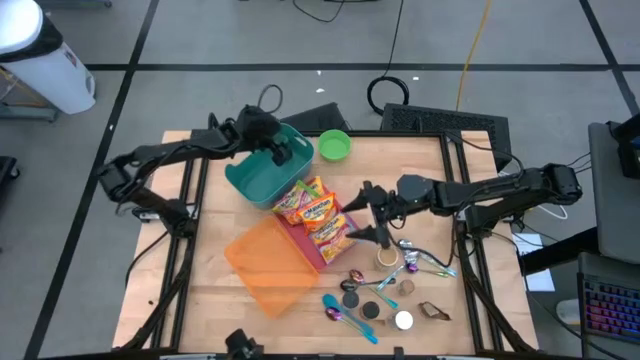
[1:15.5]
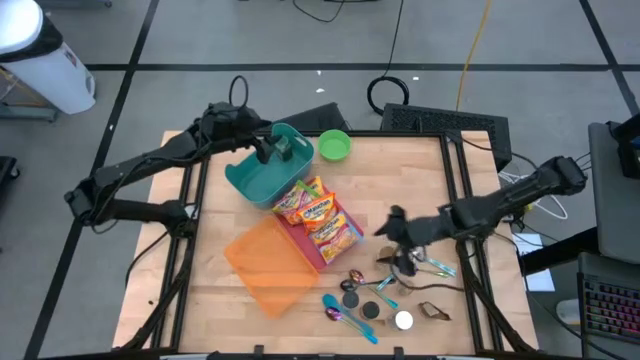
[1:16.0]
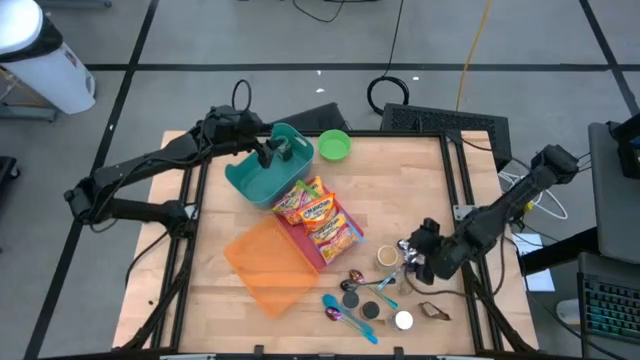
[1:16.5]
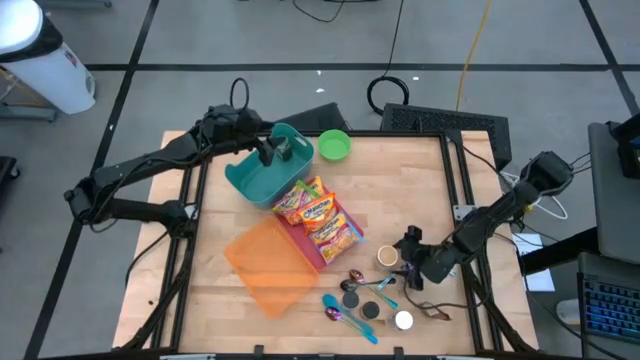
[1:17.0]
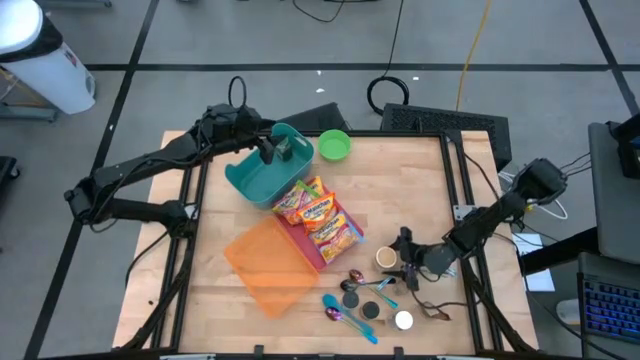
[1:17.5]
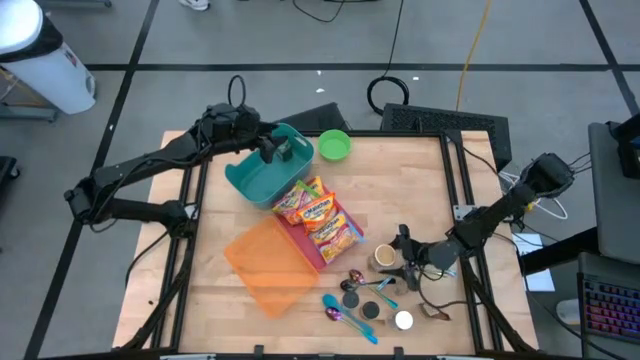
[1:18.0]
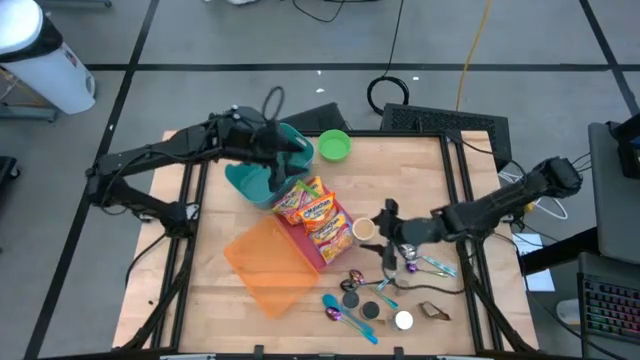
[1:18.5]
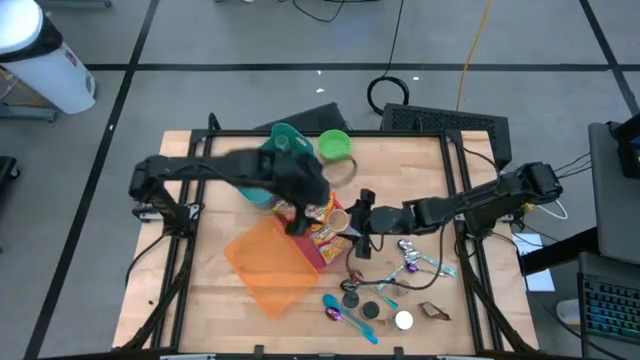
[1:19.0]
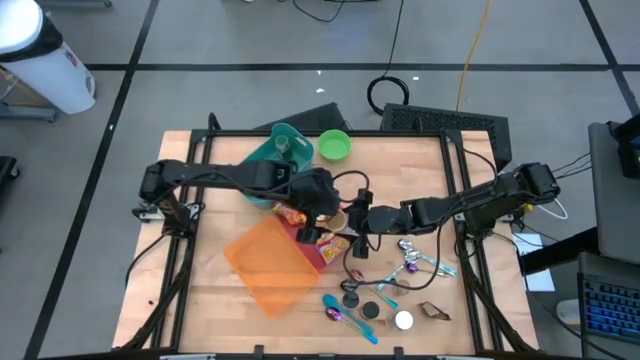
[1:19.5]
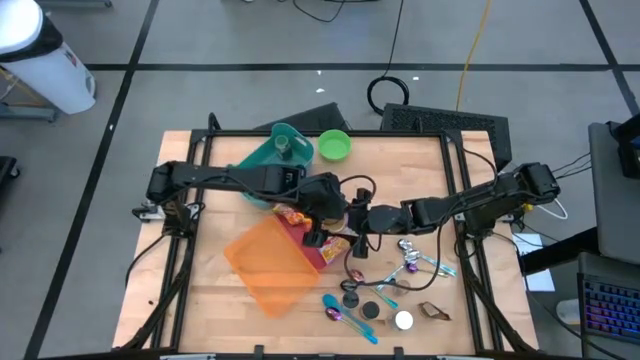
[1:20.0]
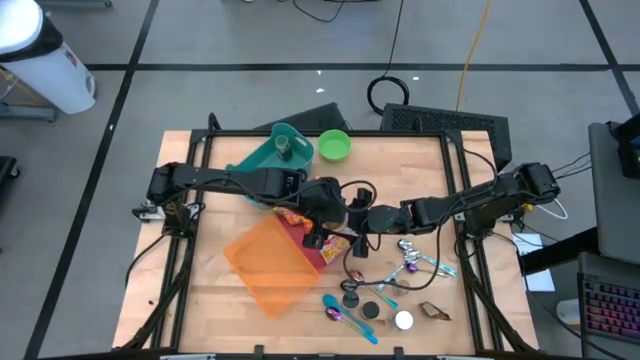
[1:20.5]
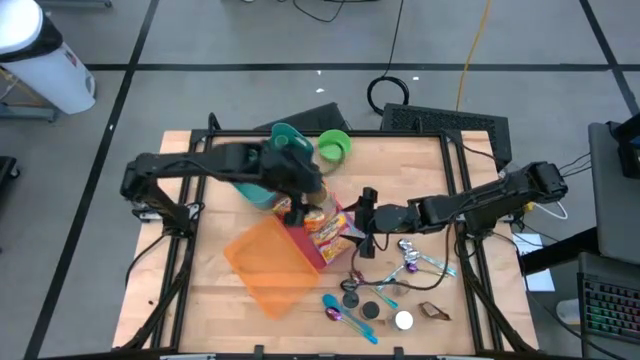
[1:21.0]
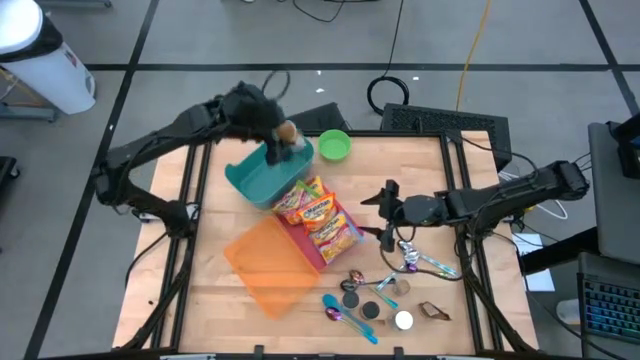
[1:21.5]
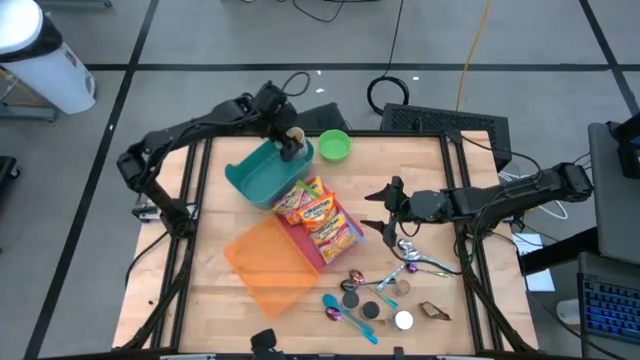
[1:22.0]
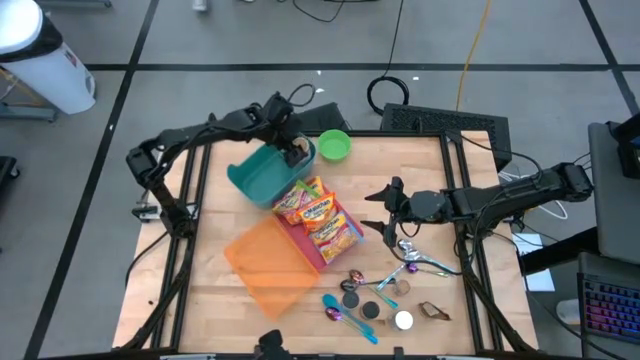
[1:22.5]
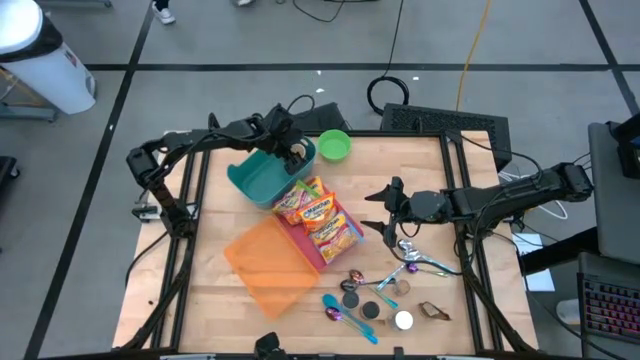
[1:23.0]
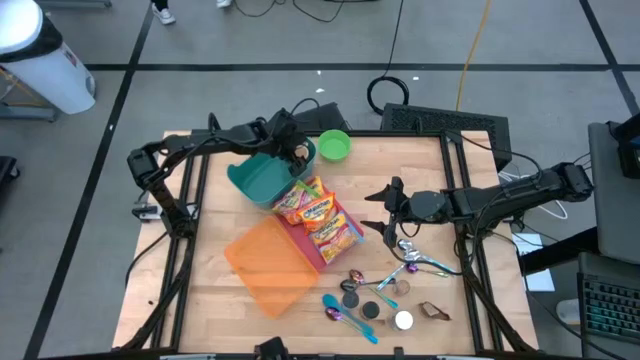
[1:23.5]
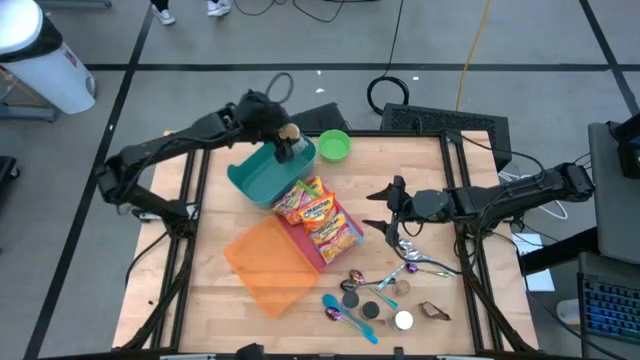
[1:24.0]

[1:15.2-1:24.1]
Task: Pick & Place Food Item
Put the gold seasoning bottle into the green bin

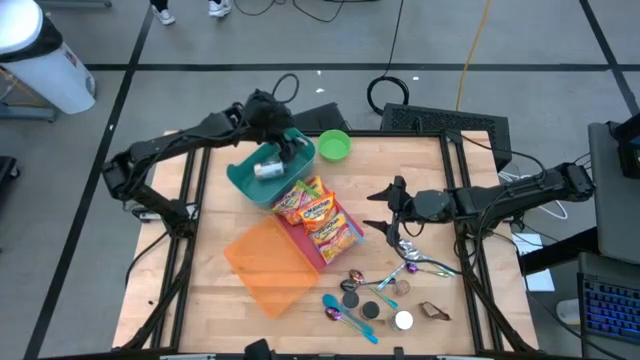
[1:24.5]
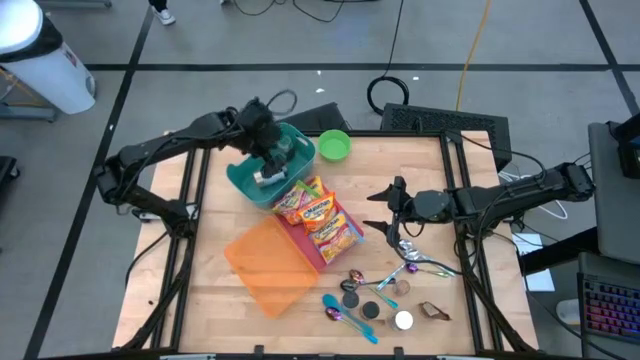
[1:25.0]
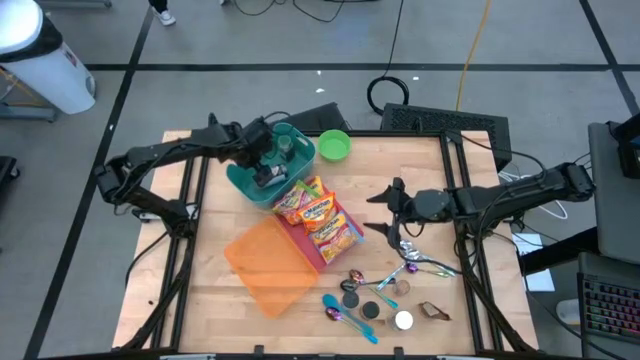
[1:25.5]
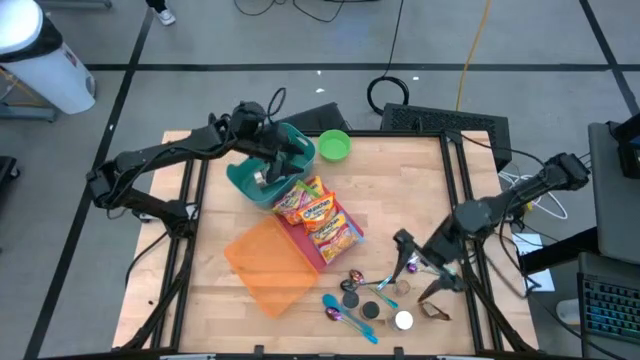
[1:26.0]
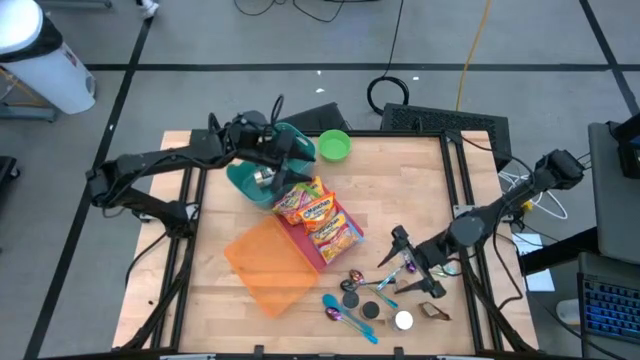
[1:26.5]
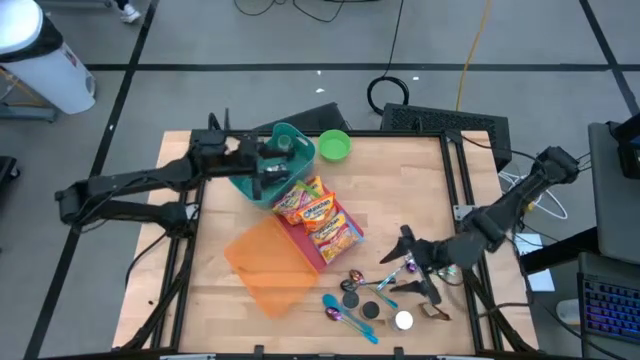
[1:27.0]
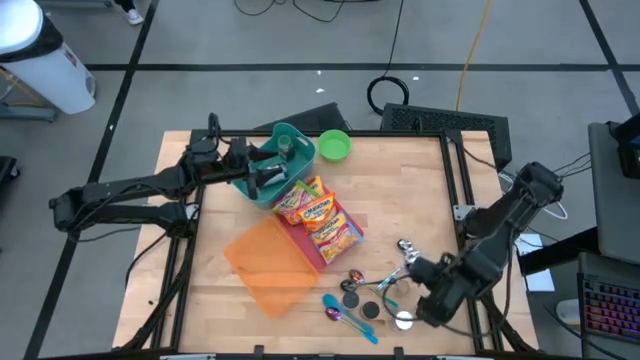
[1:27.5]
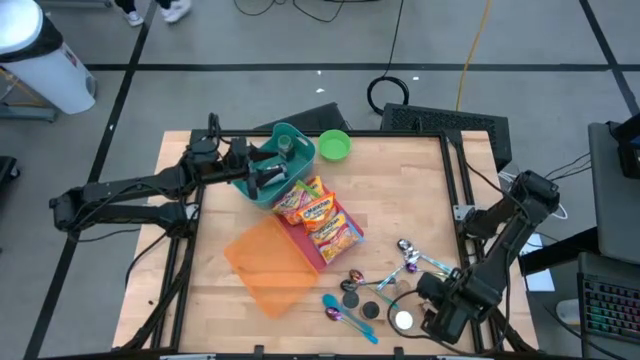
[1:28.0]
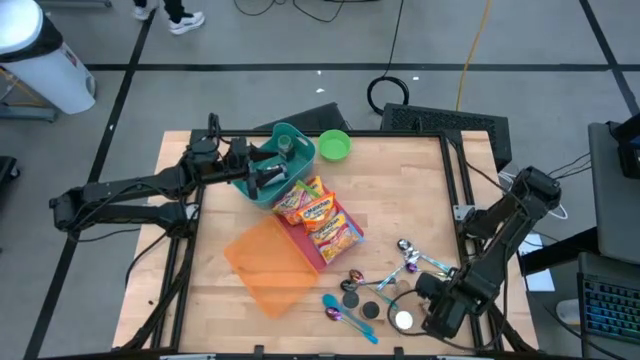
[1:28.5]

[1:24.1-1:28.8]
Put the orange seasoning pack into the green bin
